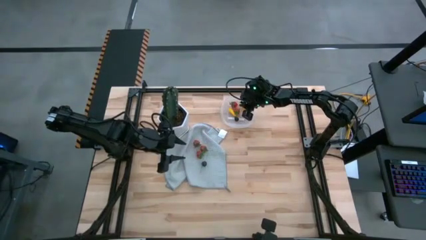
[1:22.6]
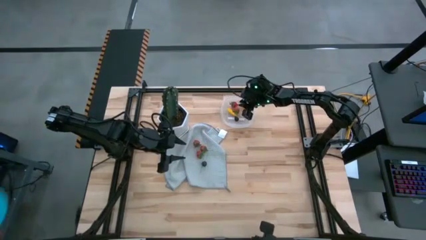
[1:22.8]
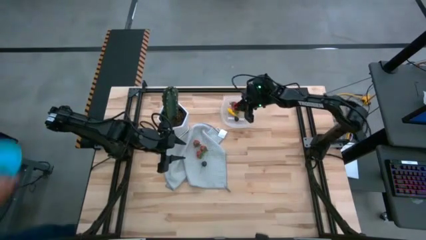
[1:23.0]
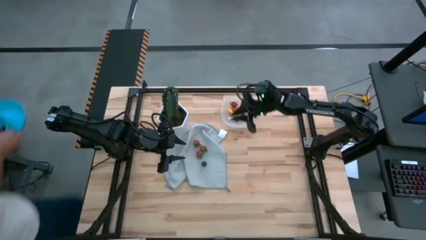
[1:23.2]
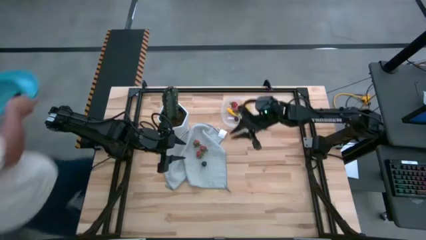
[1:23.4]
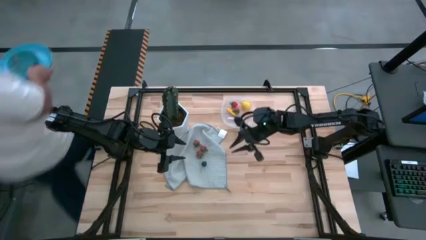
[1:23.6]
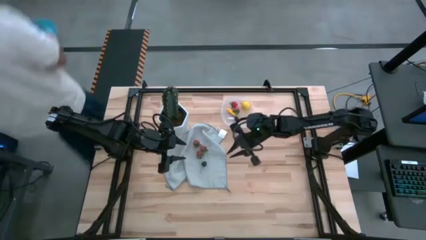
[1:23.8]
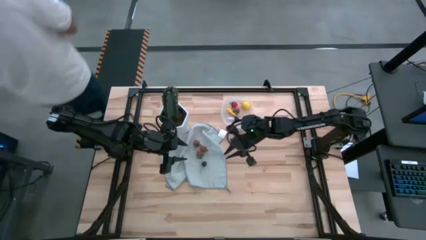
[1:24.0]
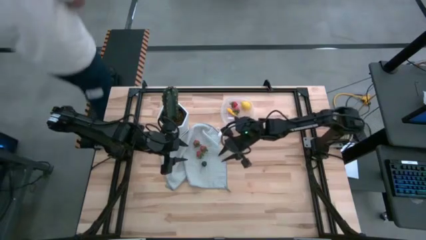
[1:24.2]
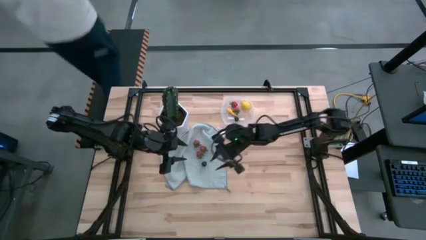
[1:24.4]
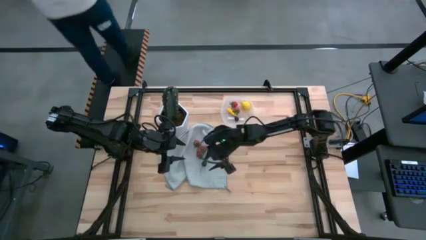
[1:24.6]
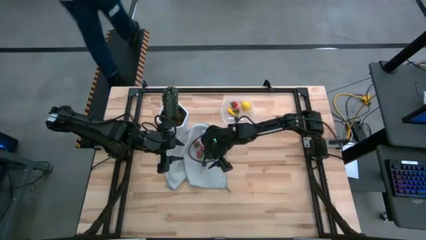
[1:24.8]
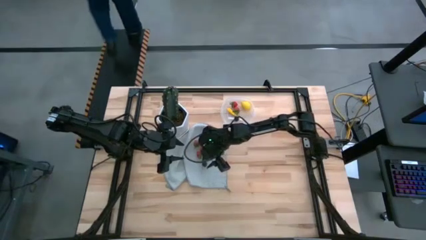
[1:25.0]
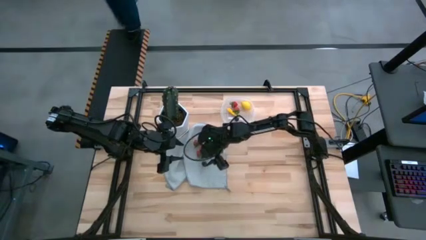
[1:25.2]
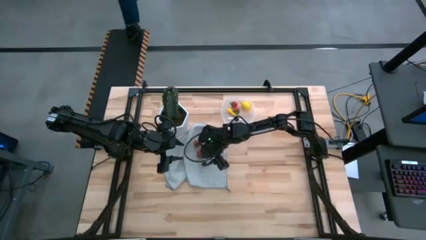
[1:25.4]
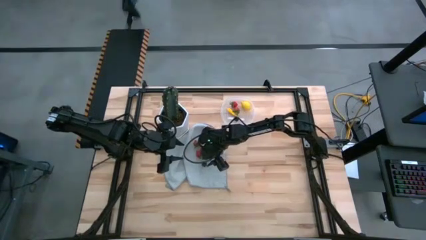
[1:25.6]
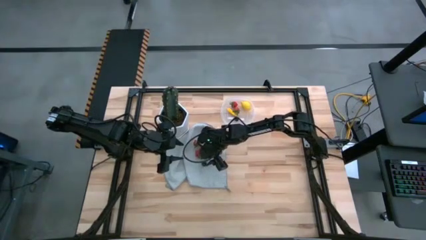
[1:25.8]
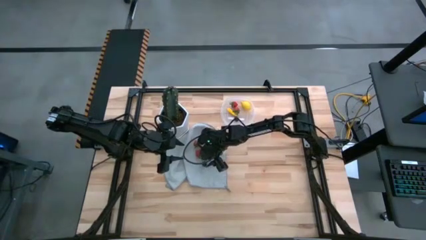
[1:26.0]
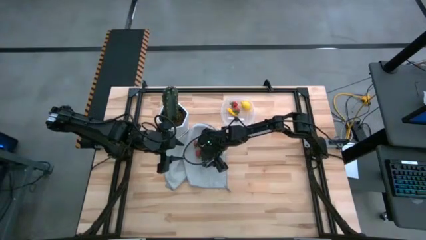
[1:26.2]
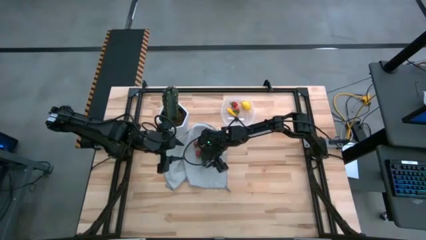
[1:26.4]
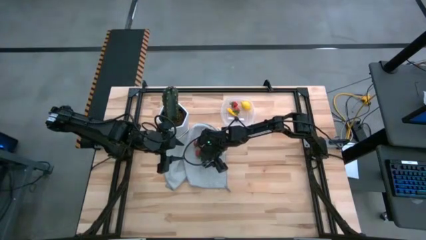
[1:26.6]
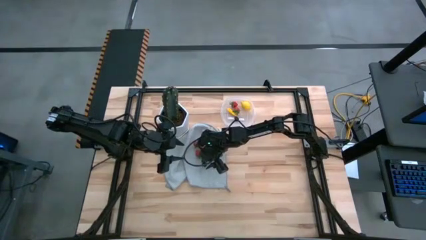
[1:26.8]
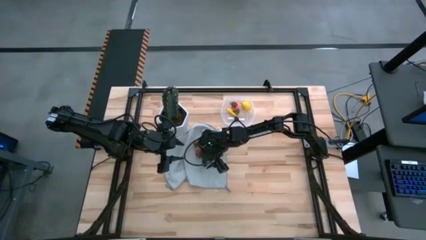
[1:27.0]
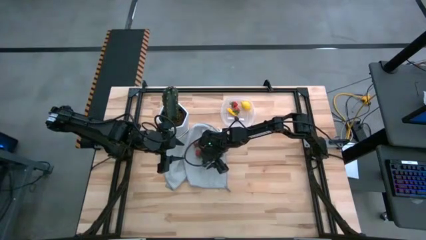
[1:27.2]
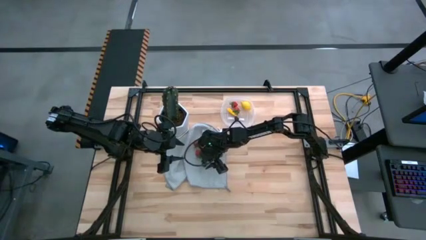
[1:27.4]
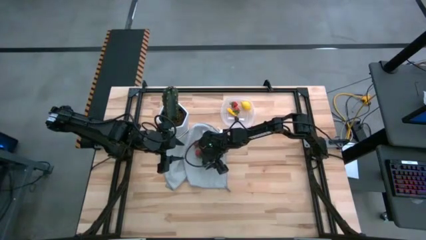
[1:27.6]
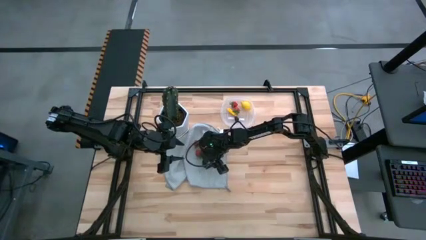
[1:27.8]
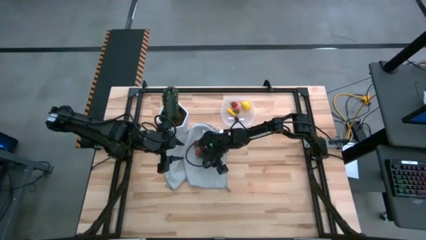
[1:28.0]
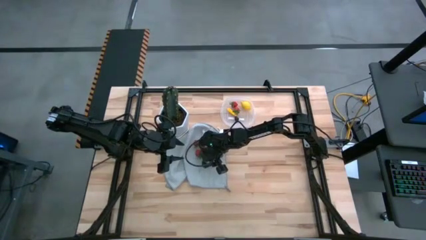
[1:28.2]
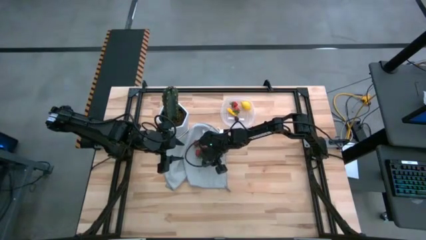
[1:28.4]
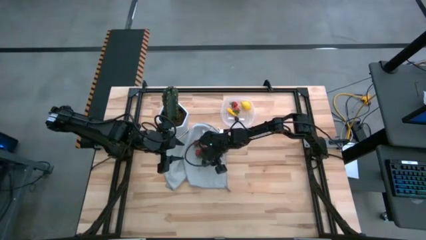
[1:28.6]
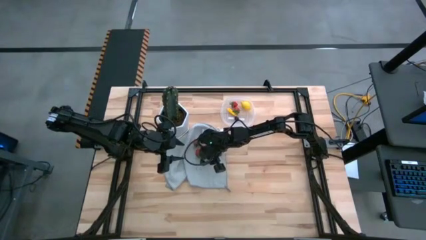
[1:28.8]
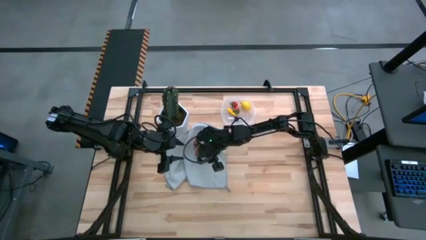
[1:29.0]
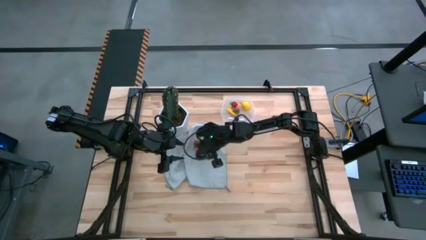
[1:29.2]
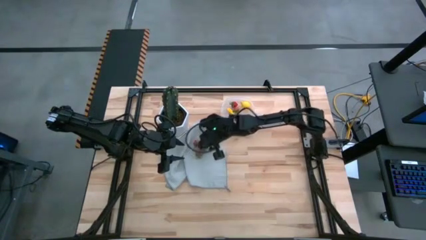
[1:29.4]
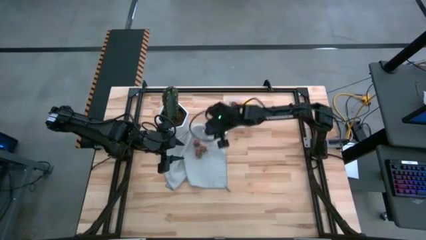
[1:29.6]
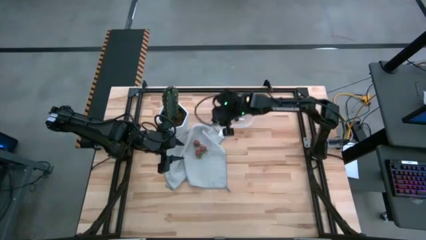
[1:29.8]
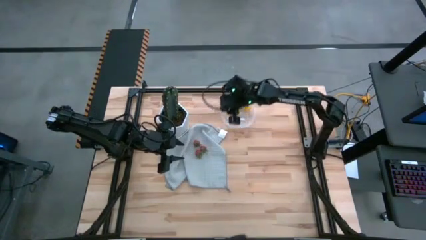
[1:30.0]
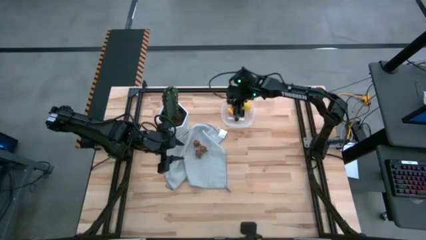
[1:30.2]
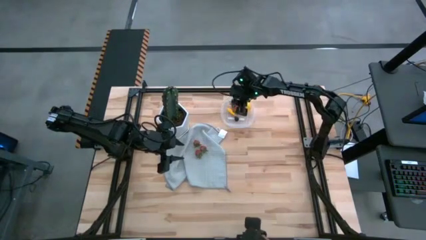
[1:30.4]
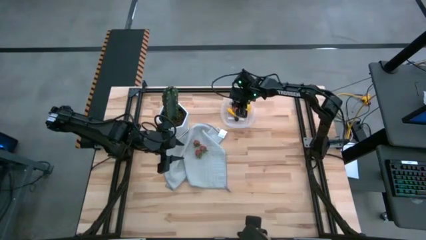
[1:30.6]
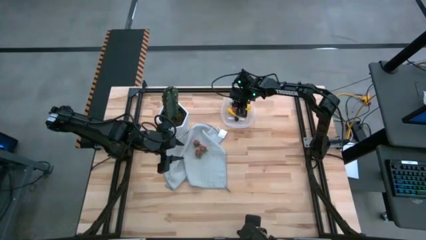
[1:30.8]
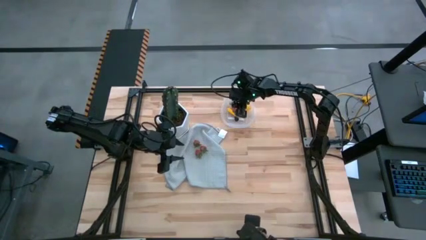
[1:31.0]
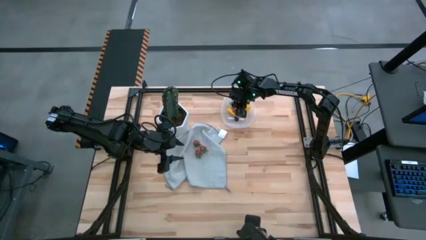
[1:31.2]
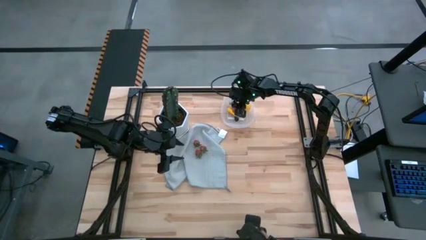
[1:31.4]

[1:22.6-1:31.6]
Task: Pick and placing Produce into tupperware
Put the black cherry into the transparent bin

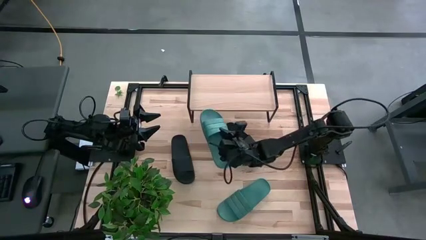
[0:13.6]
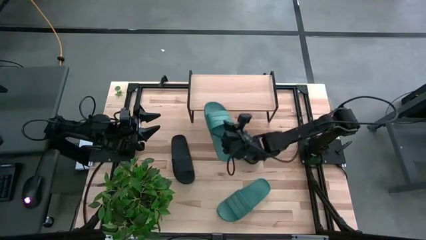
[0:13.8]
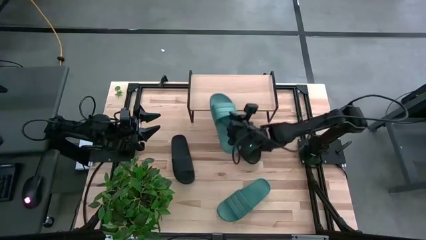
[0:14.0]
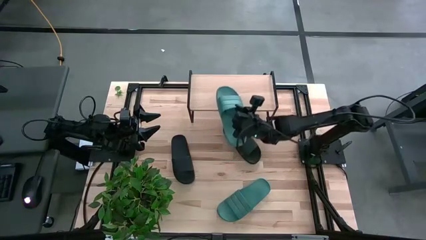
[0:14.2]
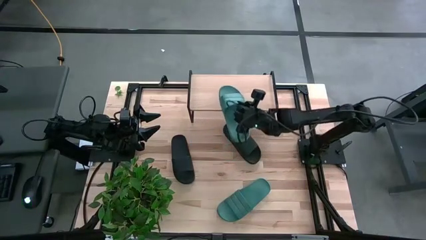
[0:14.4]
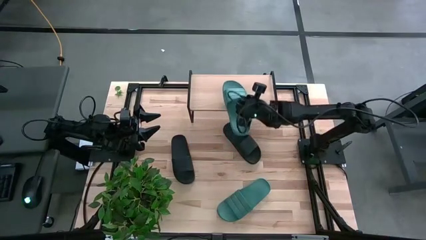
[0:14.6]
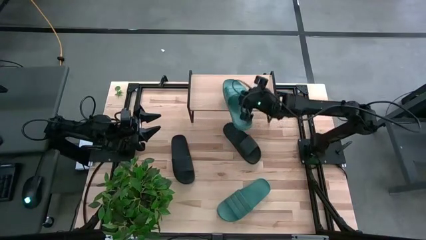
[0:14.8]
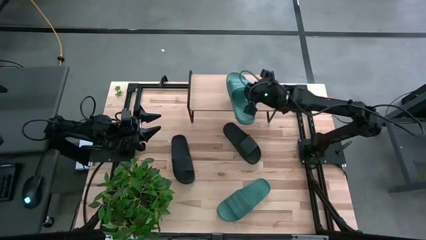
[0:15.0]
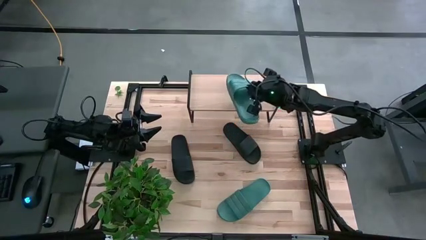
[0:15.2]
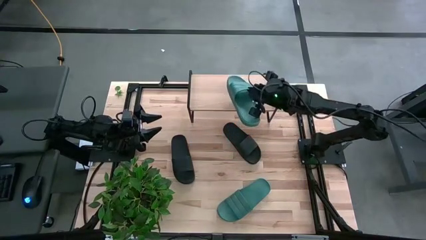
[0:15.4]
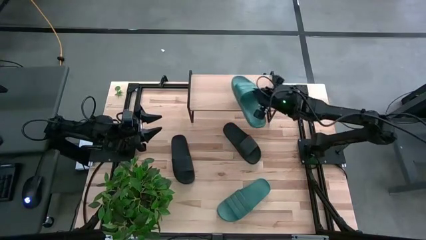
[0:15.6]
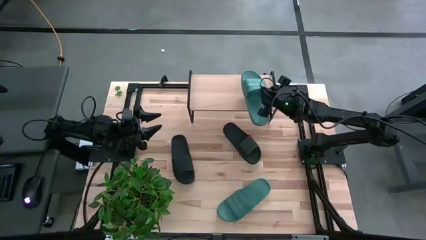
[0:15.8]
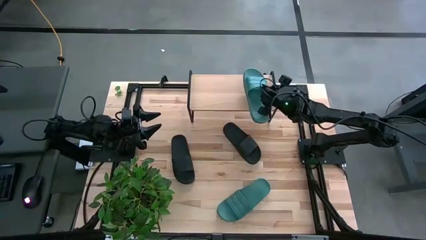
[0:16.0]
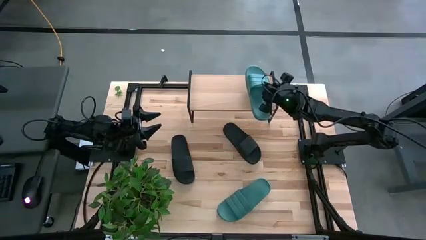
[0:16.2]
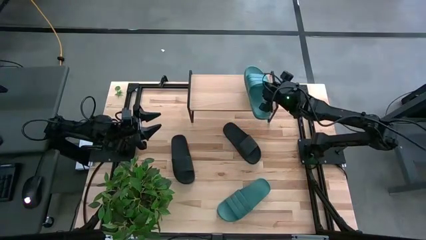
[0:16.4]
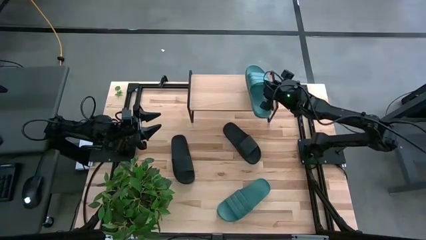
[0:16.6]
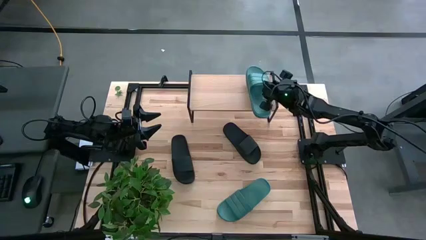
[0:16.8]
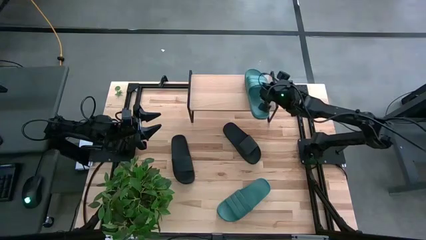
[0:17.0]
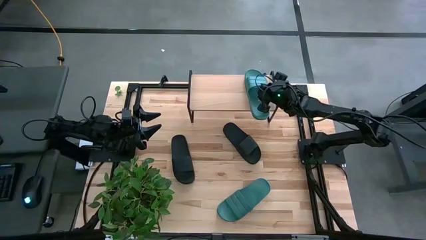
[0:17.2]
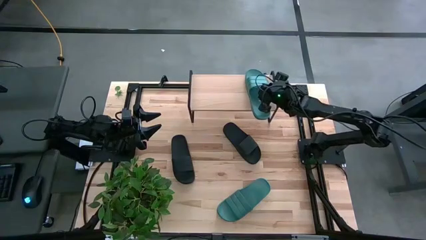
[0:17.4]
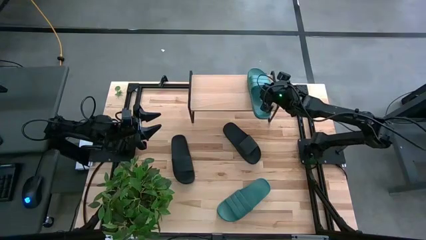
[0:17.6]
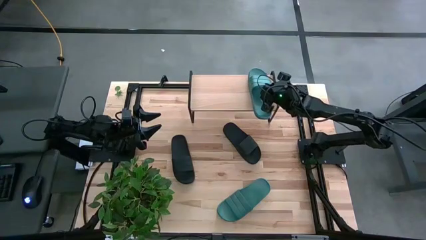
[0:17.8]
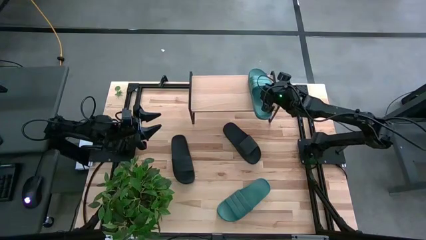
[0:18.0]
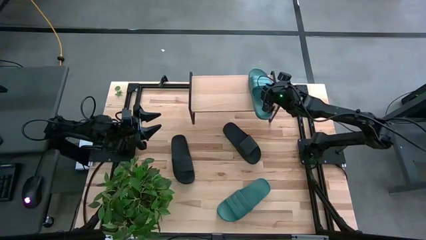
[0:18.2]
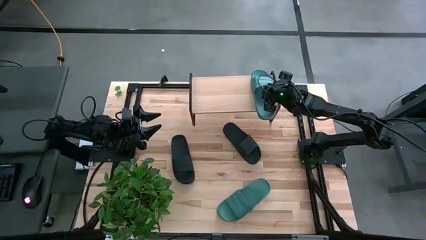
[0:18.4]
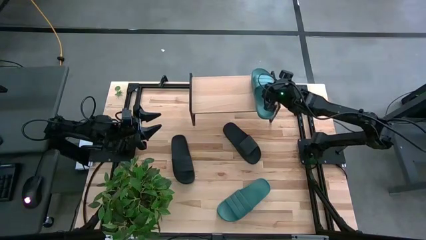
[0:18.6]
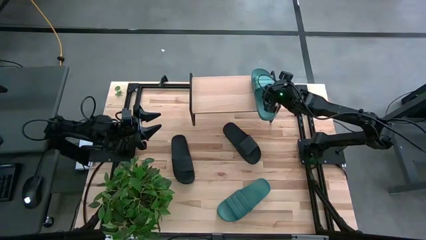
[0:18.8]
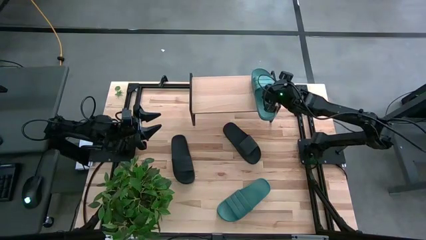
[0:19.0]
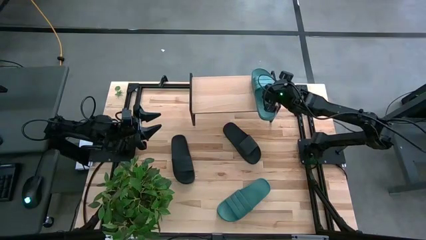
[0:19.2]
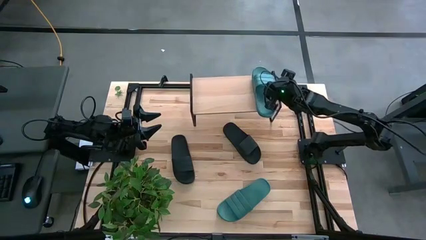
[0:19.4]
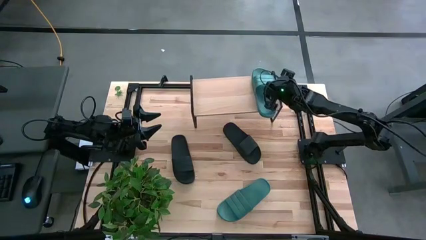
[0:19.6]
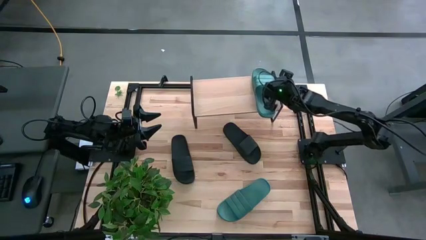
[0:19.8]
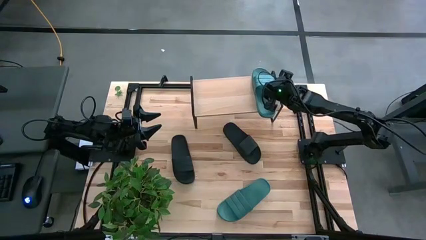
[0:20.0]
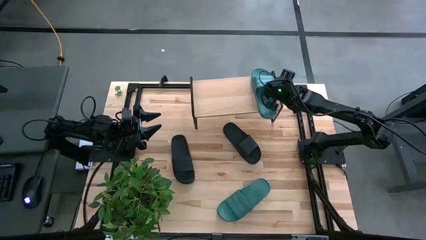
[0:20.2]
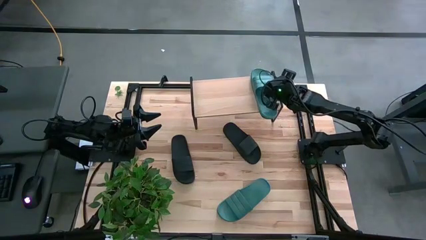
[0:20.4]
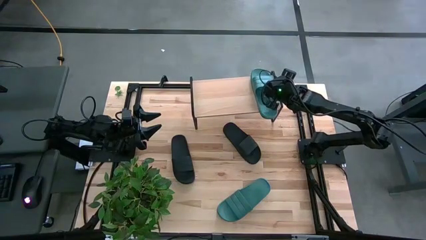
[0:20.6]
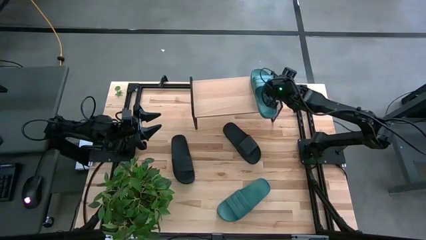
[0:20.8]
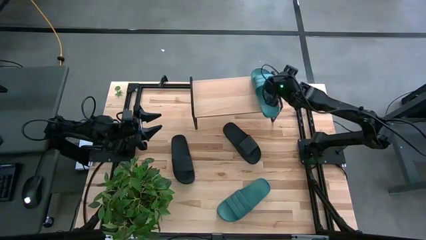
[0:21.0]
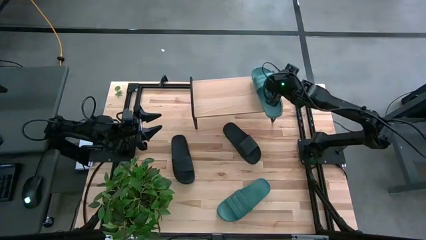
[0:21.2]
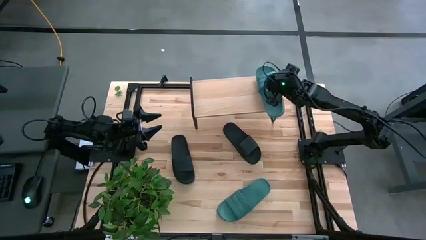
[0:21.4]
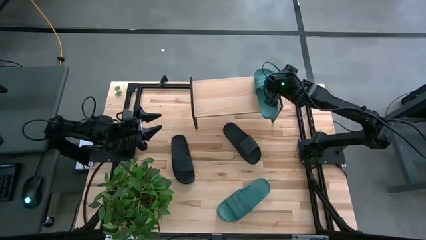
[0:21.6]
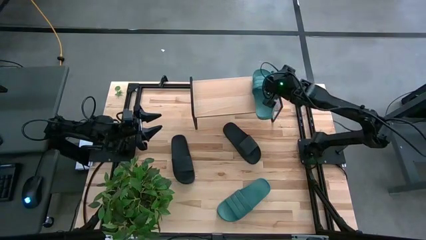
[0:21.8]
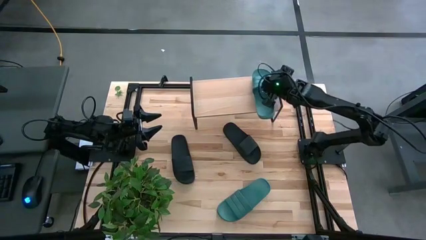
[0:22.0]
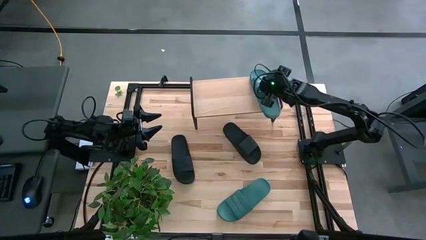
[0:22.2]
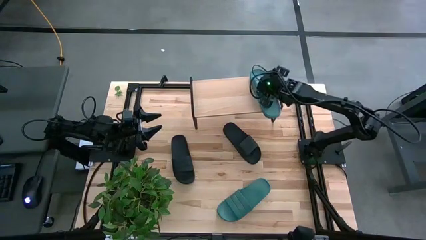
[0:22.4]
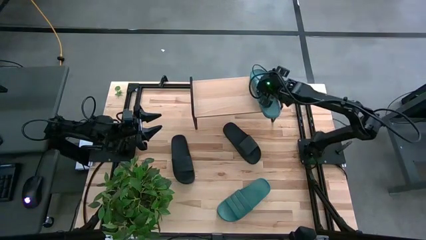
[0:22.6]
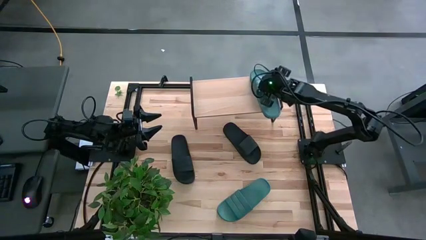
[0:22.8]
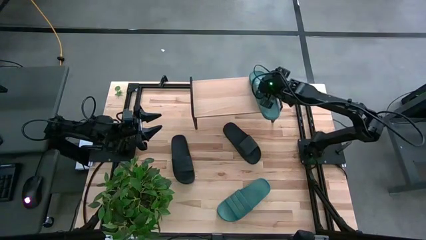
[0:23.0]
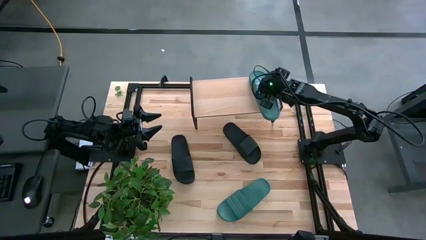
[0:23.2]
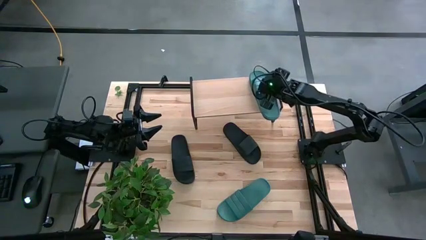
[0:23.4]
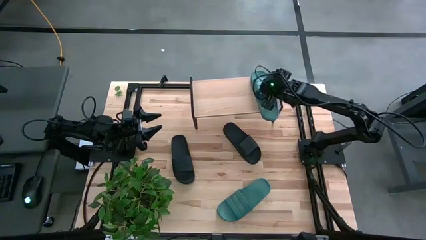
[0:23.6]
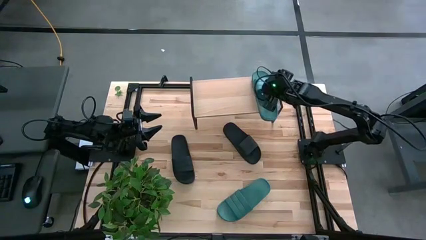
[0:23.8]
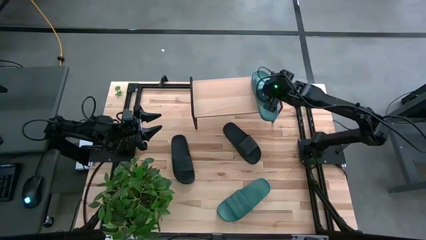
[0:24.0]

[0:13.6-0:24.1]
Task: Pick and place slides into the shelf
Put the top blue slipper on the shelf
